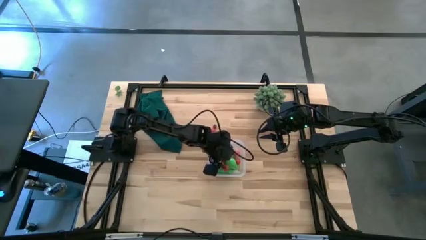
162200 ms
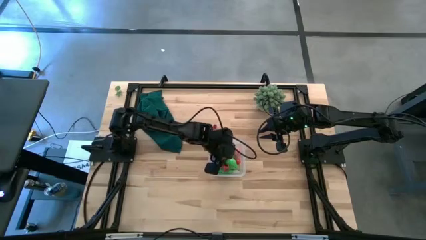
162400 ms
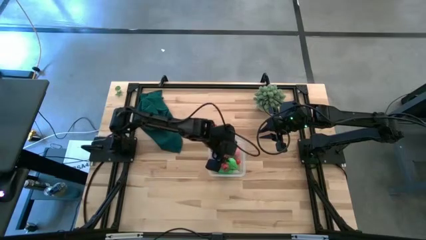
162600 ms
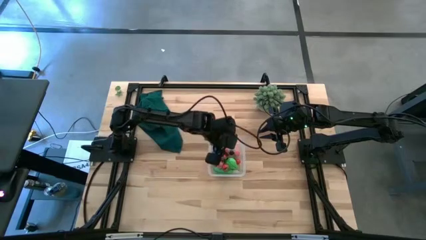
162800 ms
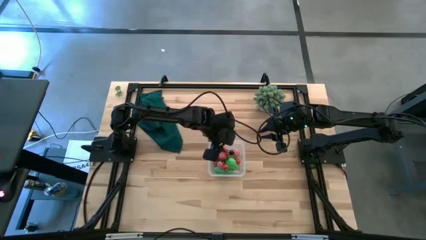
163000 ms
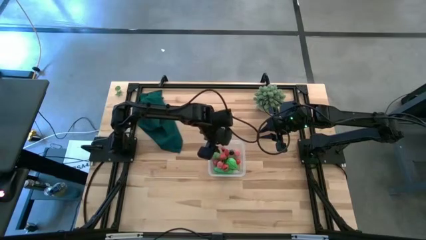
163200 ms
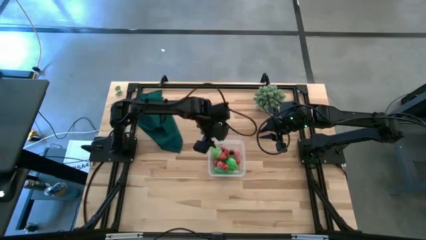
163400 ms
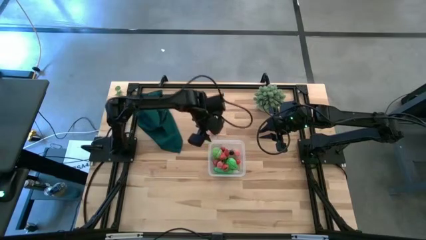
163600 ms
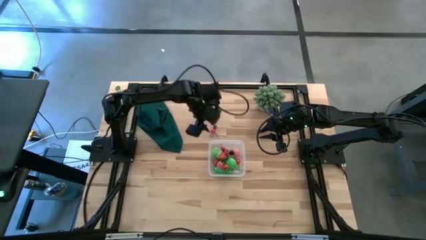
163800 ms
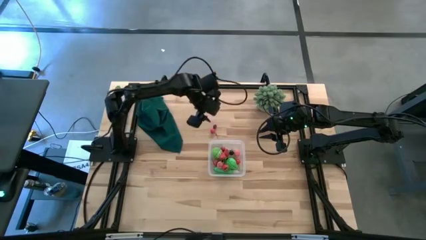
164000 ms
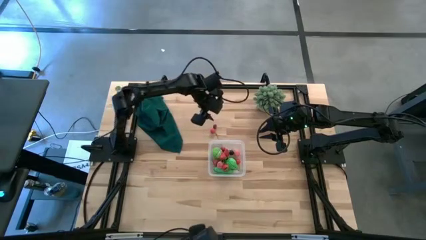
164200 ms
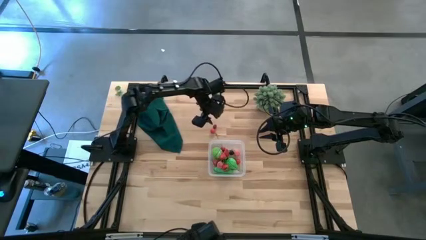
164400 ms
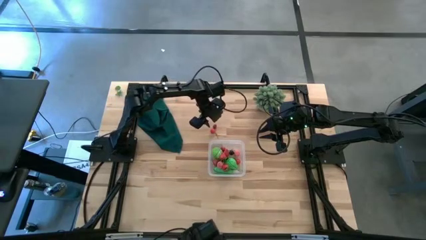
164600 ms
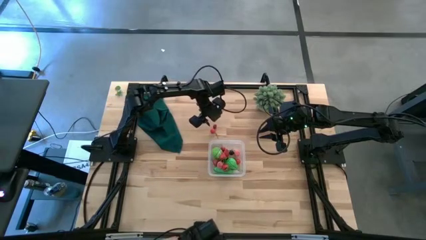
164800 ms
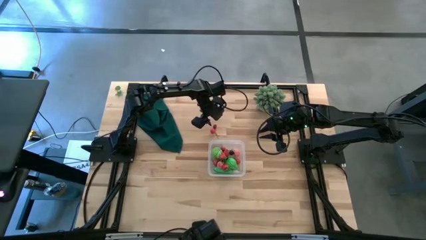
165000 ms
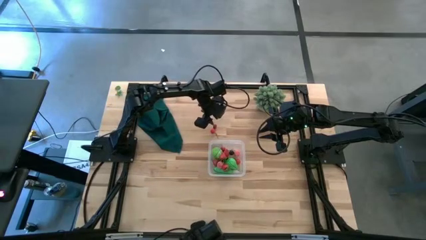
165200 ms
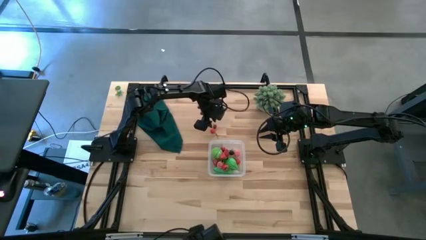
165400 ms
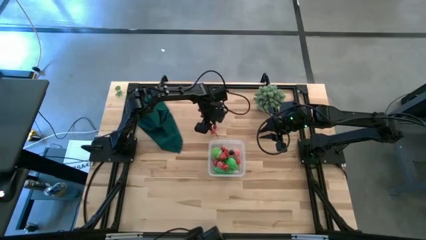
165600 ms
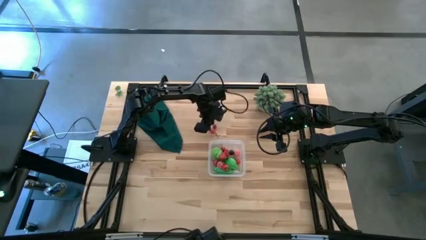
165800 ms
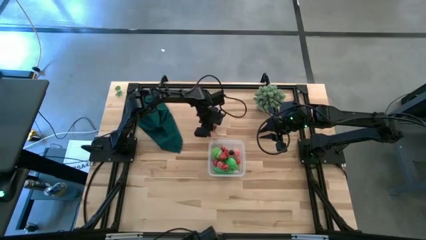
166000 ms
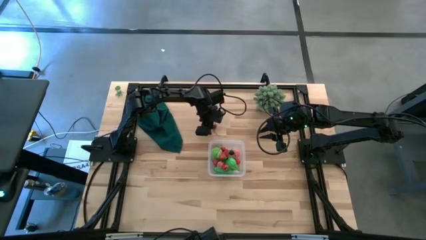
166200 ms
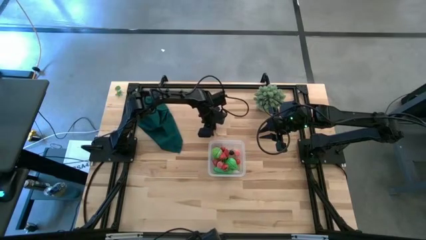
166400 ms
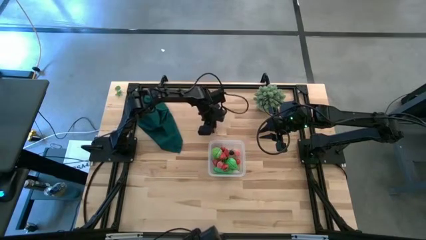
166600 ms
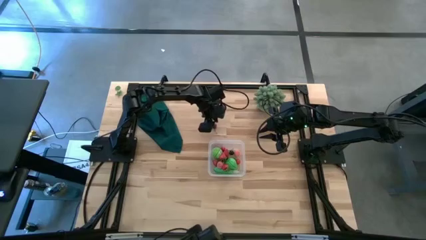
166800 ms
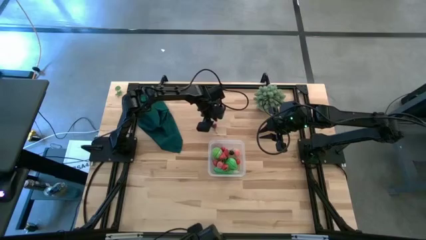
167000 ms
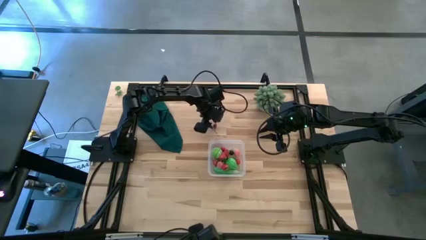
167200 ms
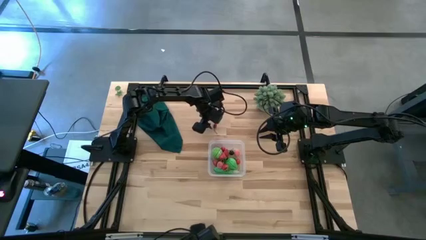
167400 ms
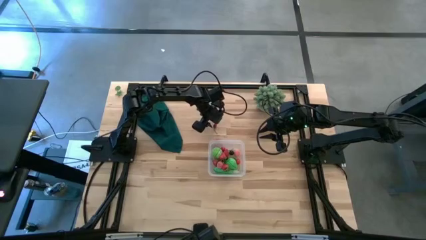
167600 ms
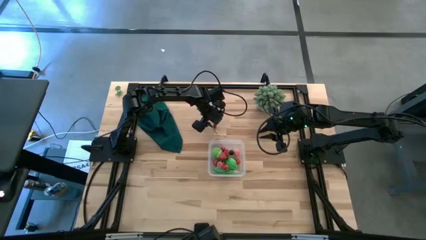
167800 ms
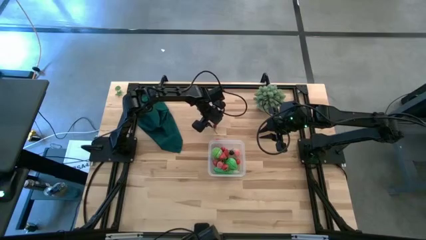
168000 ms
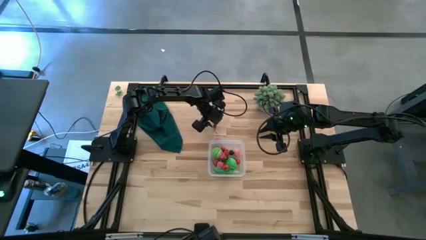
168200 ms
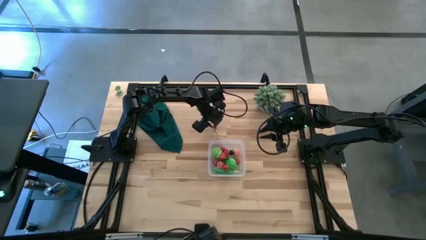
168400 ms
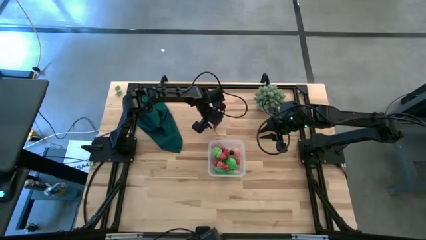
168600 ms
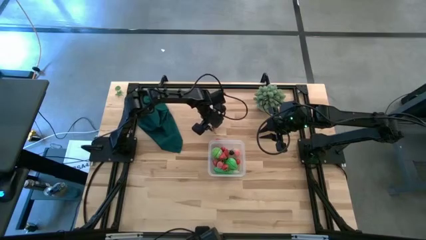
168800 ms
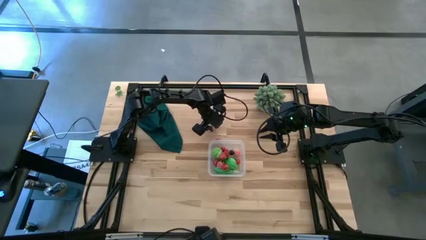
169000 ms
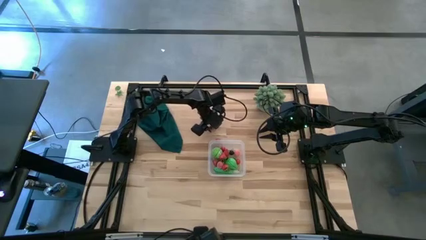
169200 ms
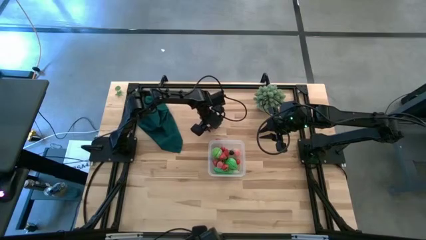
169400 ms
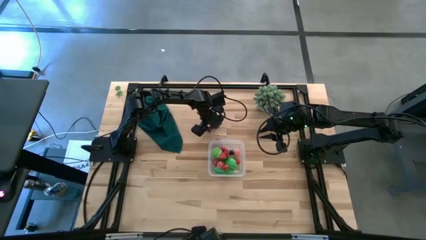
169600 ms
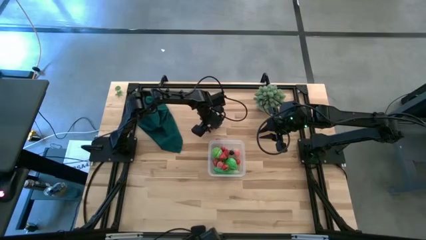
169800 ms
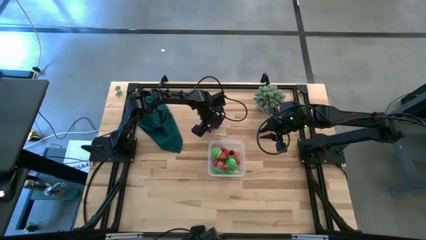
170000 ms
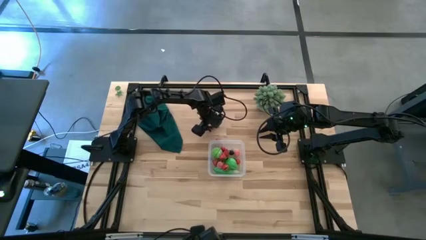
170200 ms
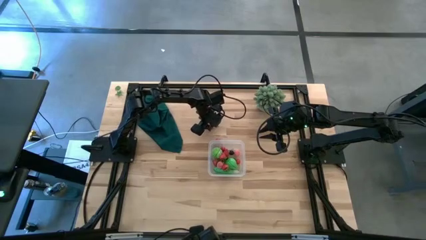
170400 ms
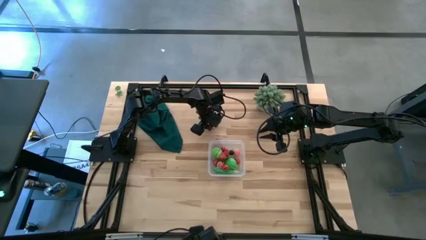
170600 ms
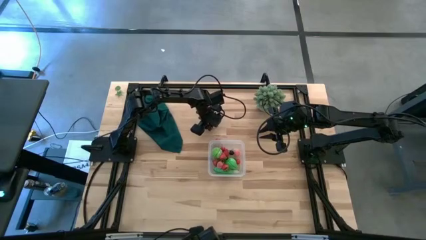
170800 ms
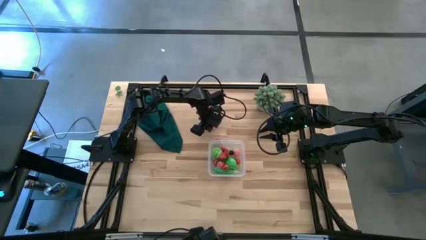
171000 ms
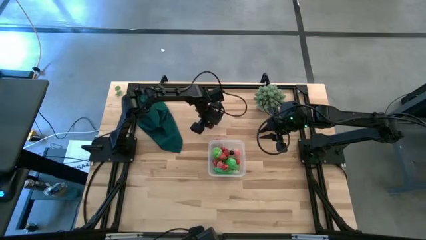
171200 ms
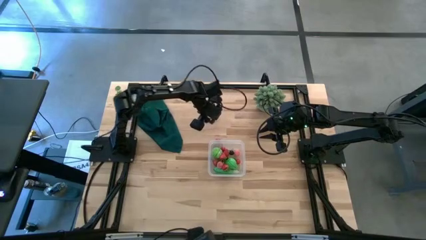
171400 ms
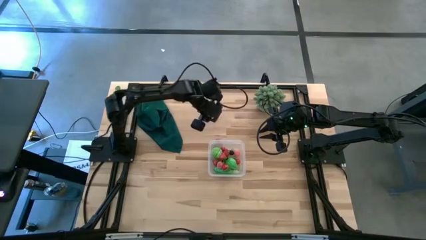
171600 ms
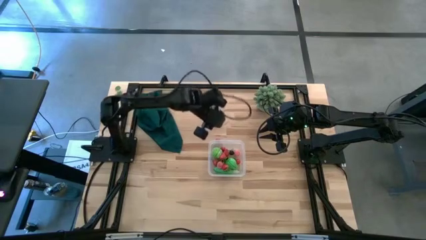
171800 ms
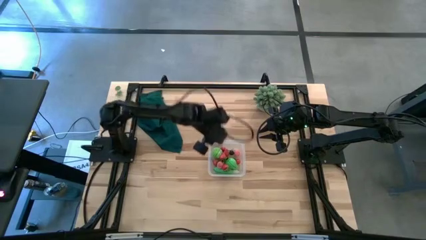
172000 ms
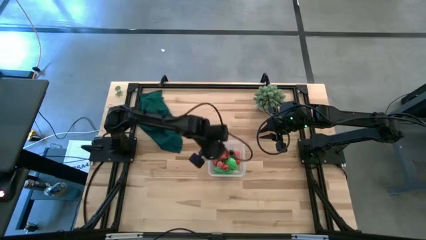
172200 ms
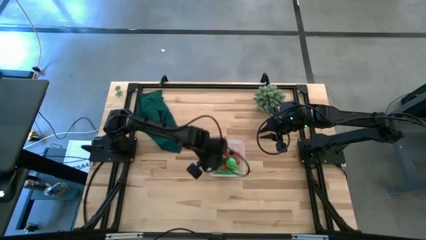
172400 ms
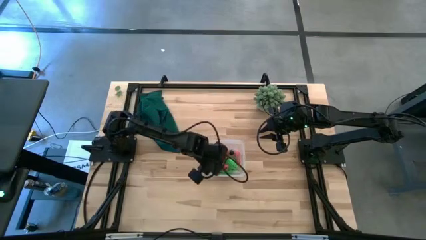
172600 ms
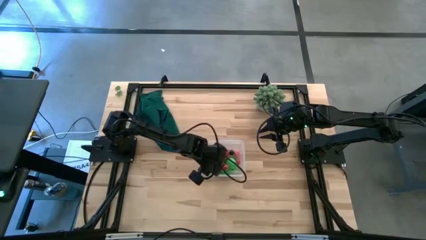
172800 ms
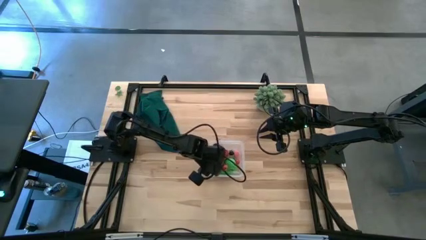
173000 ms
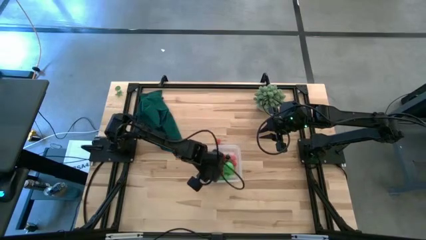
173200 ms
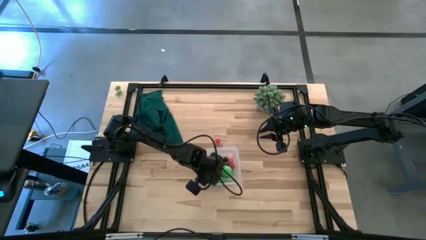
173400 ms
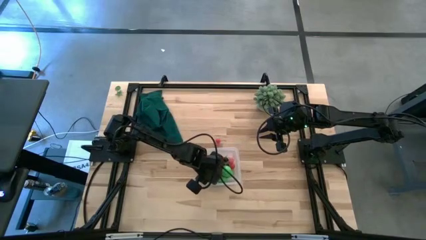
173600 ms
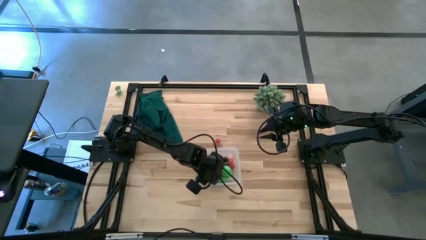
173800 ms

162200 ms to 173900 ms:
Task: Pick and placing Produce into tupperware
Put the top red cherry into the container

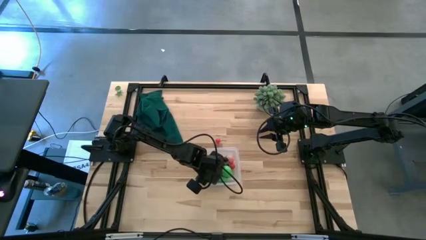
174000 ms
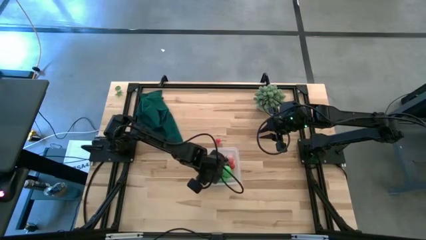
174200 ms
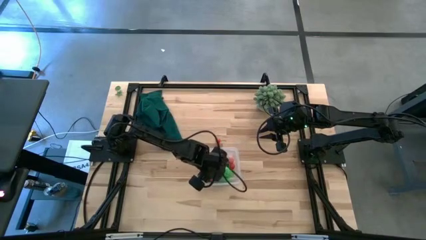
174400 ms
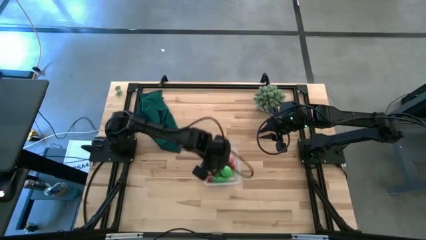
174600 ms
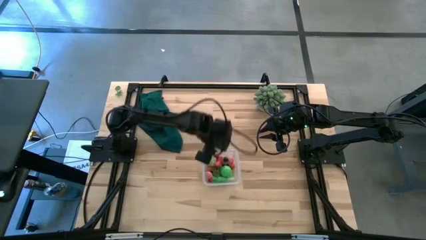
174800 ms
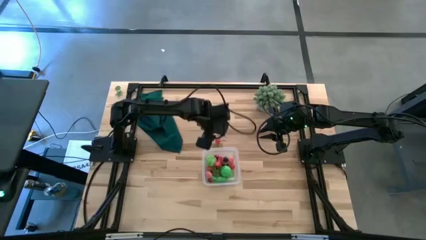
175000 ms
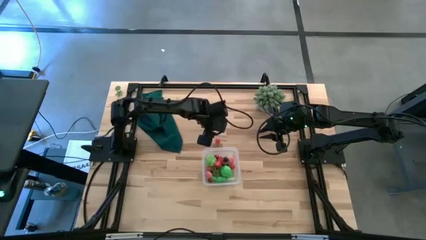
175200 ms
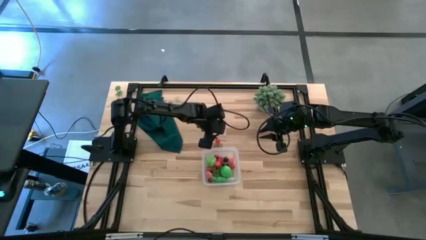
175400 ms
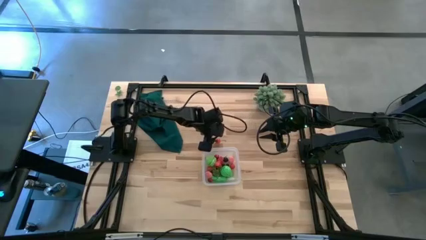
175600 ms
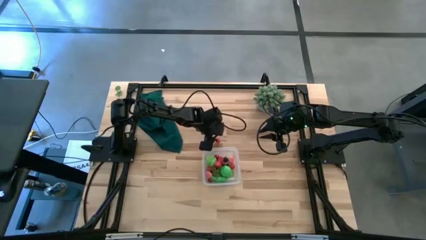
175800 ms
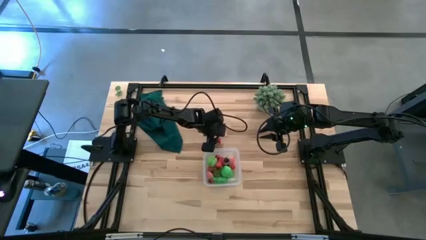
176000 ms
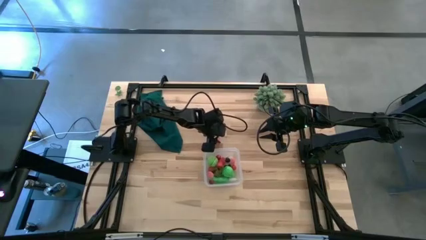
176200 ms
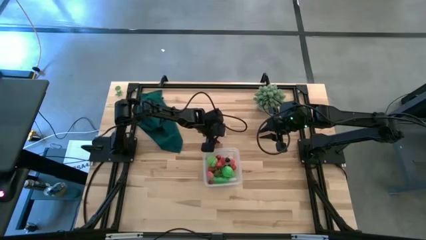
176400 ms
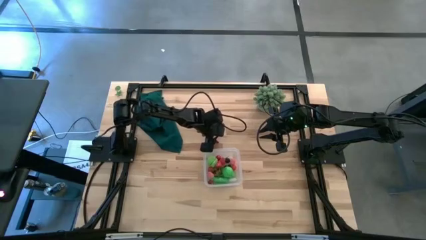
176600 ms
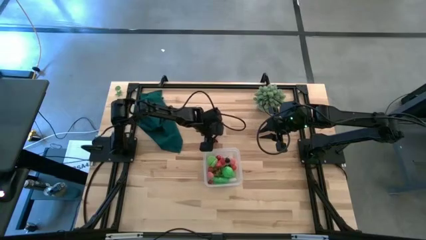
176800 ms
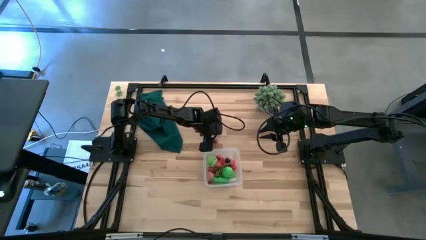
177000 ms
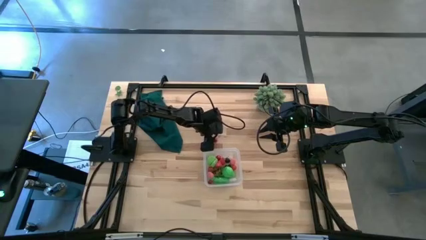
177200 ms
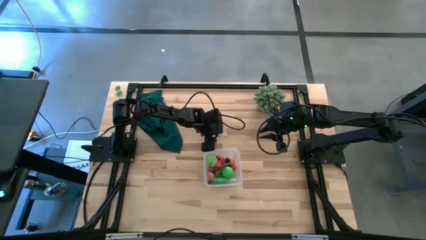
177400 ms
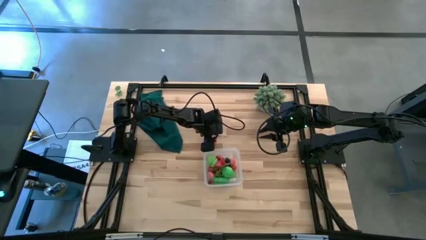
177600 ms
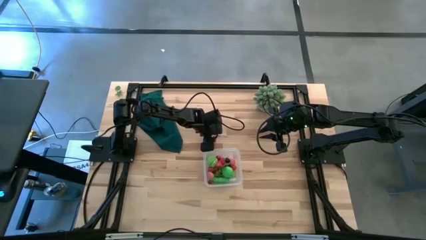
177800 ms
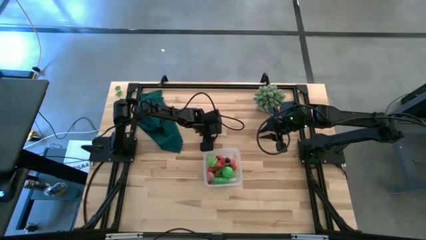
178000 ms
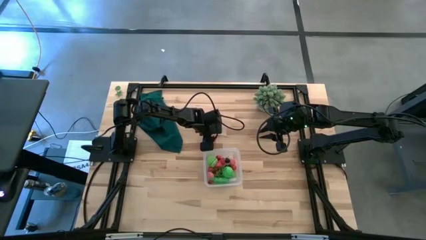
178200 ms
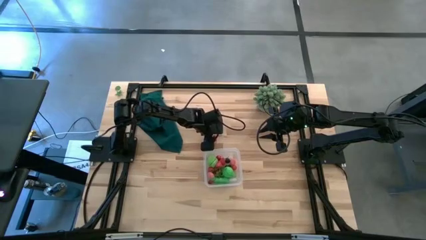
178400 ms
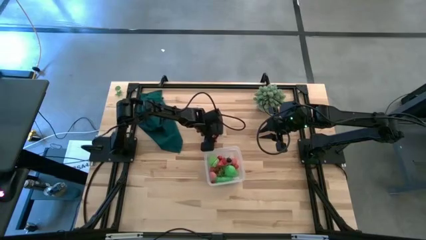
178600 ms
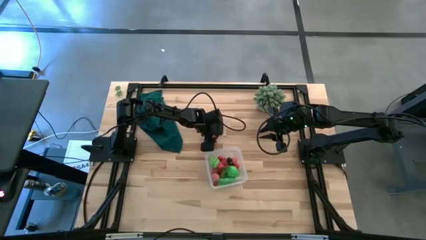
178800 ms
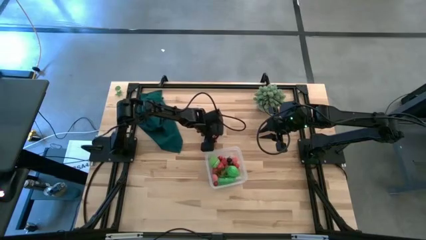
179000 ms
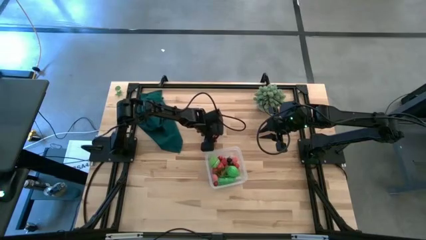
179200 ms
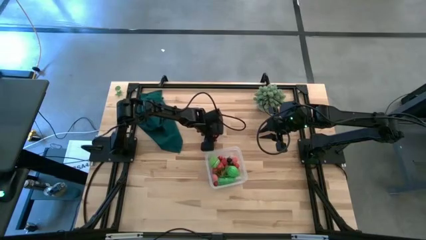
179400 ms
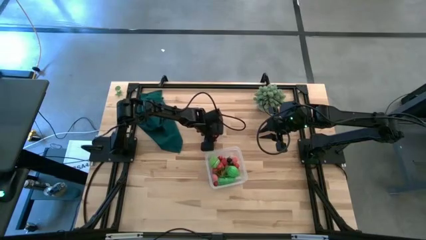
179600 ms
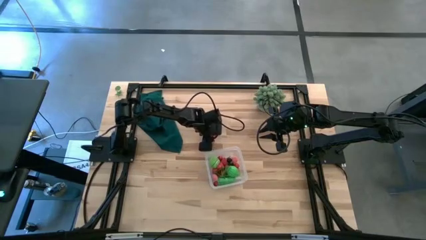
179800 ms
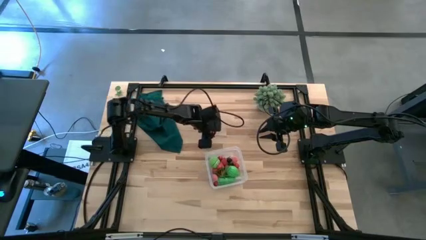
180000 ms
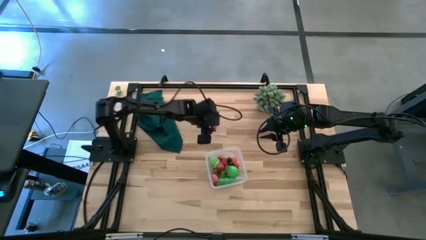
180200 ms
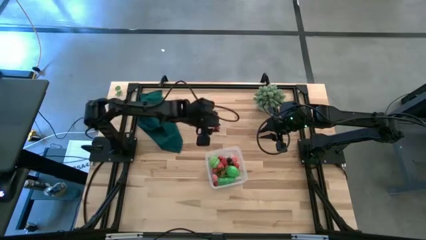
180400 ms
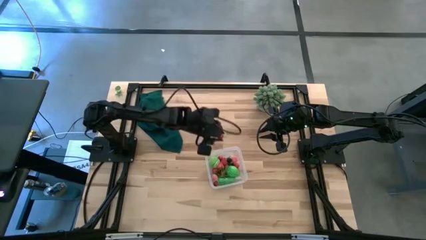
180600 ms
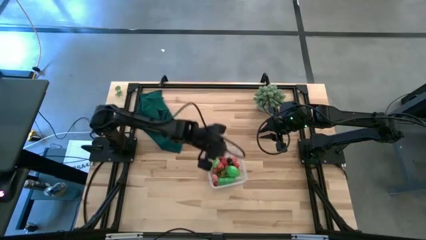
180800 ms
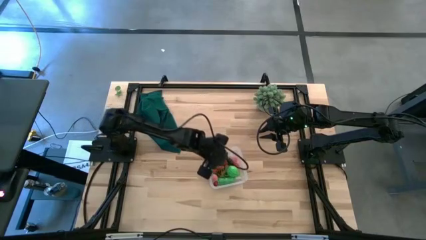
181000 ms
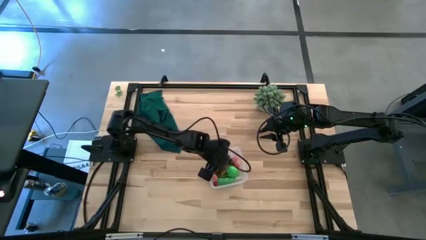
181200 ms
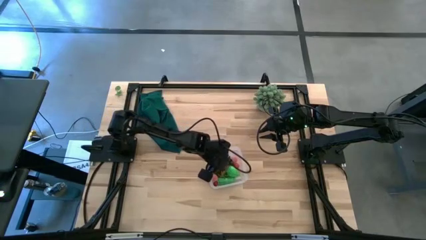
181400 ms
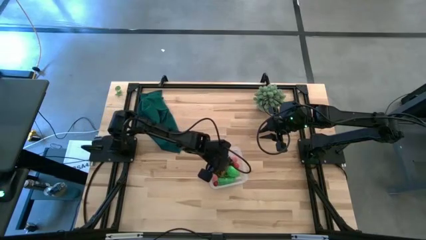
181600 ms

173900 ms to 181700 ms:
Put the red cherry into the container
